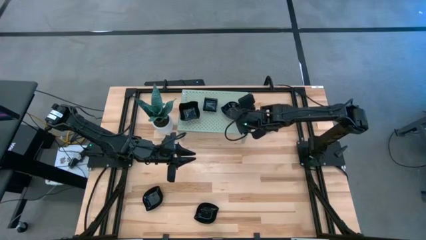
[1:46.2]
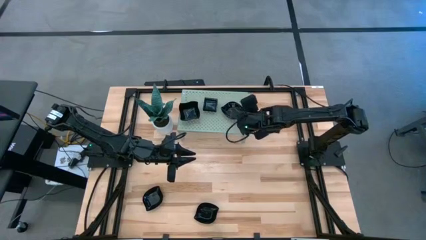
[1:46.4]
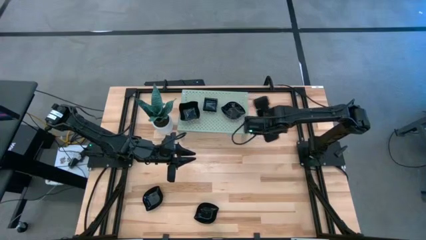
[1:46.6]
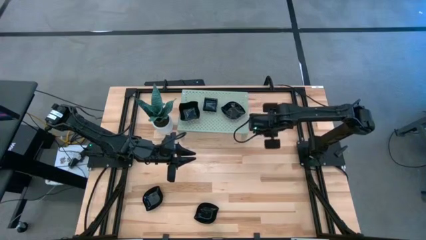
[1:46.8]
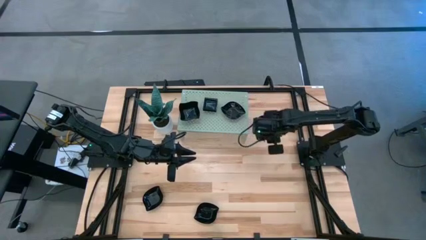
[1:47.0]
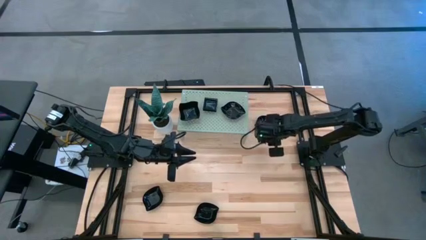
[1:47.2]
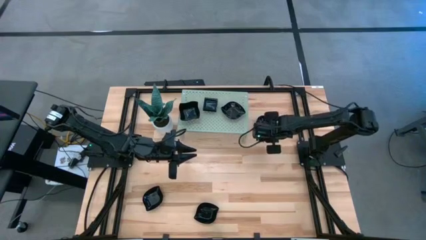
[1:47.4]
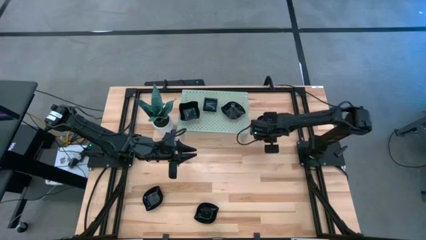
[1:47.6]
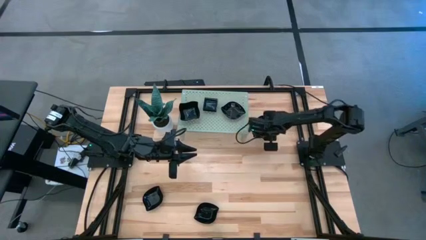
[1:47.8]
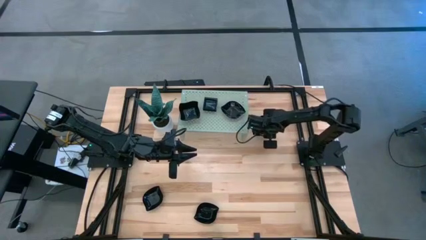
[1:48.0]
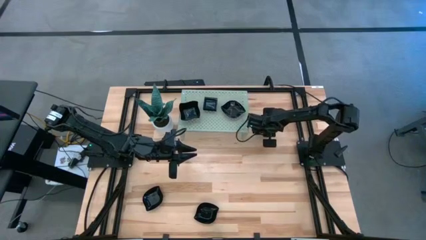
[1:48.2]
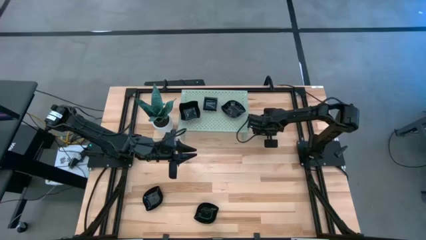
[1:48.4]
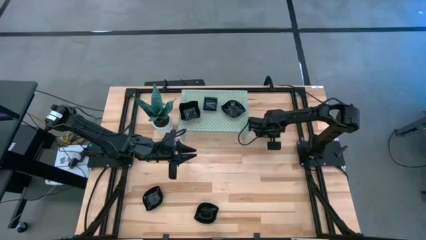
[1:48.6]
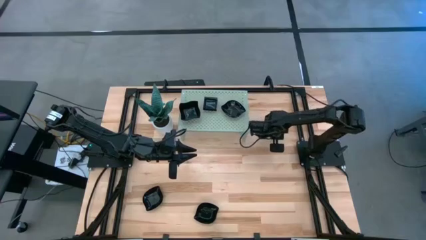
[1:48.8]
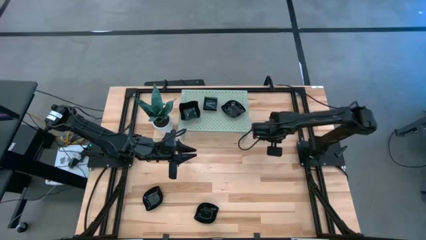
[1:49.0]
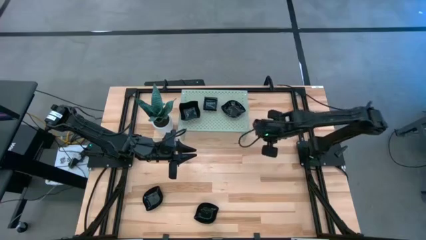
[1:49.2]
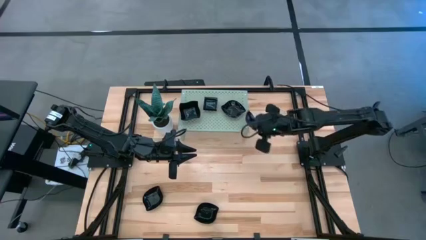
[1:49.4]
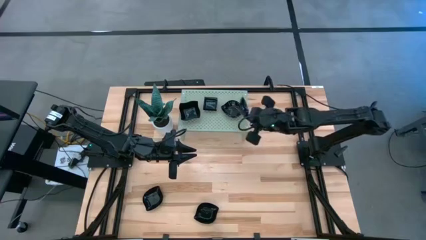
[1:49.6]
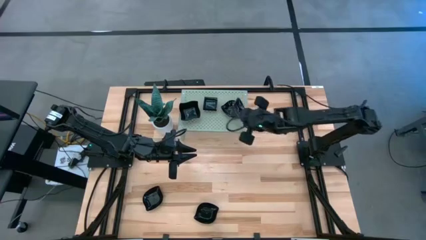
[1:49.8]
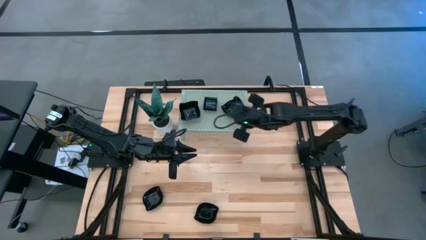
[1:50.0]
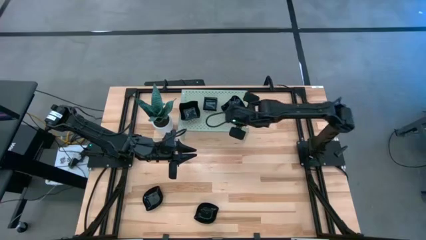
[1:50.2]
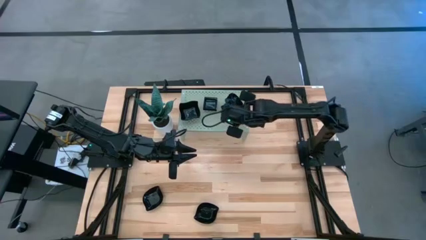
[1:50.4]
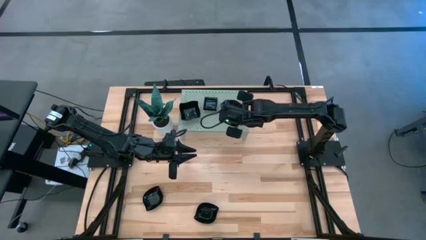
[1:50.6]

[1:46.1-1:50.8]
Task: Pick & Place Mini shaped plates
Stack the leaf-shaped plate on top of the other leaf-shaped plate on the shelf

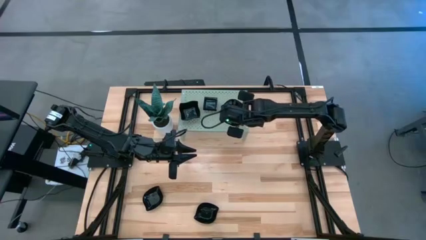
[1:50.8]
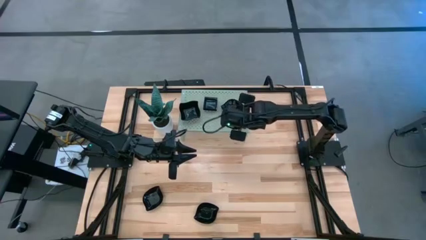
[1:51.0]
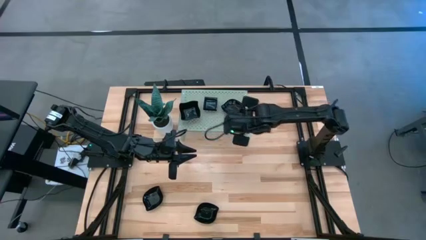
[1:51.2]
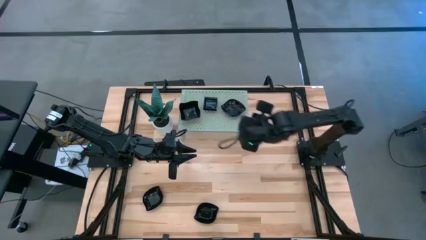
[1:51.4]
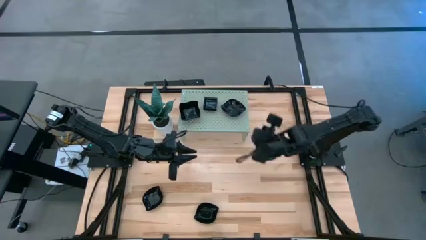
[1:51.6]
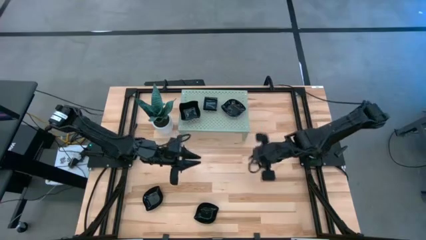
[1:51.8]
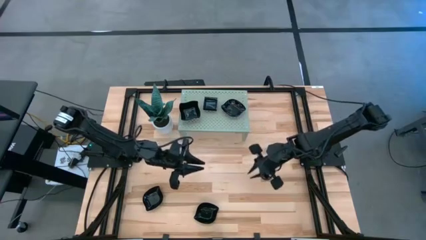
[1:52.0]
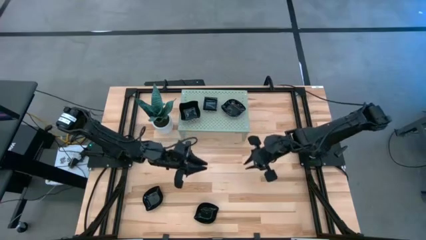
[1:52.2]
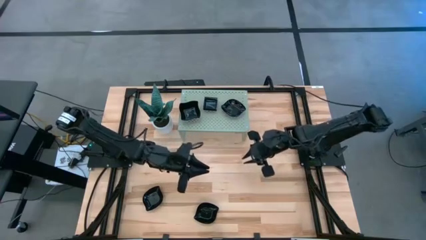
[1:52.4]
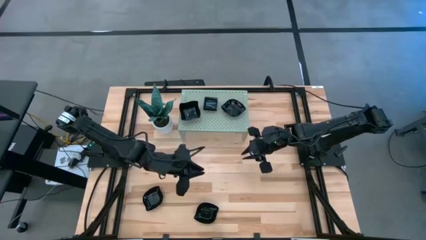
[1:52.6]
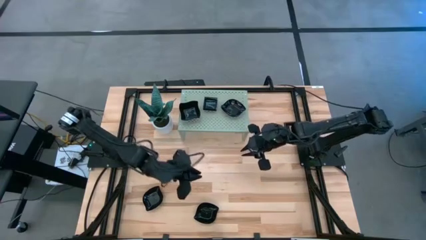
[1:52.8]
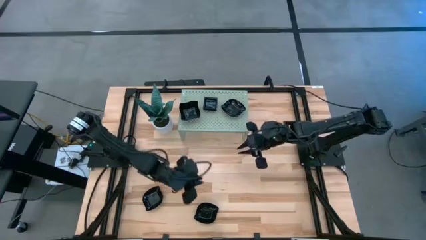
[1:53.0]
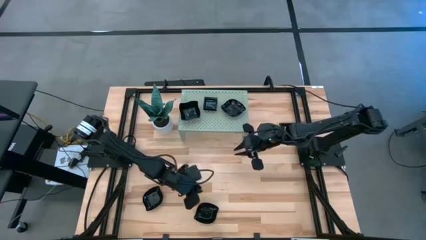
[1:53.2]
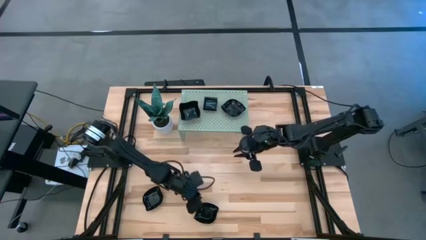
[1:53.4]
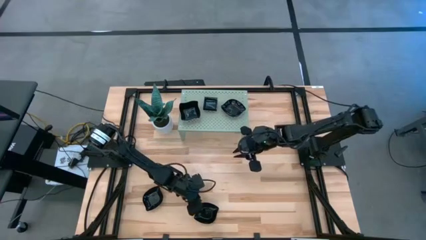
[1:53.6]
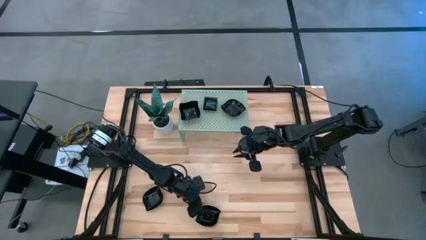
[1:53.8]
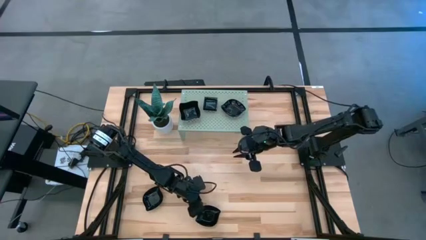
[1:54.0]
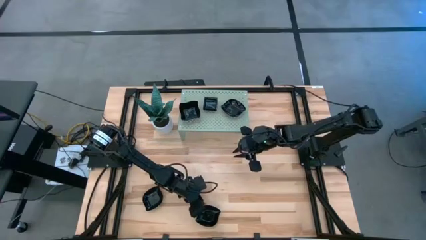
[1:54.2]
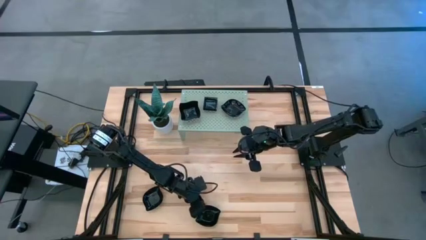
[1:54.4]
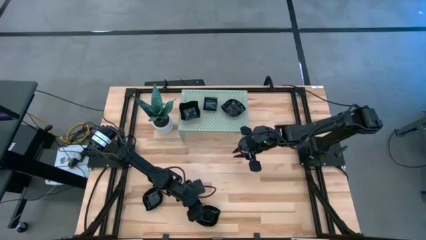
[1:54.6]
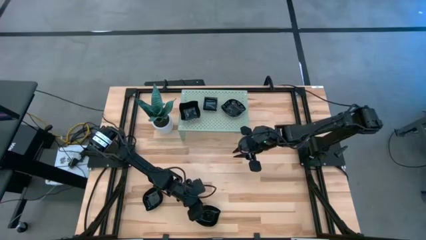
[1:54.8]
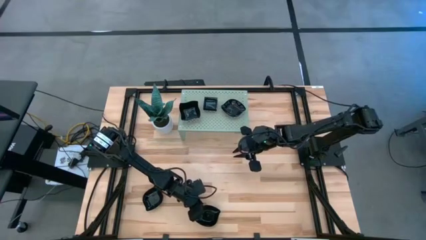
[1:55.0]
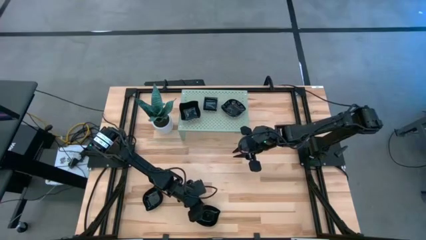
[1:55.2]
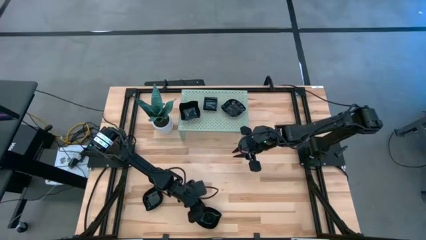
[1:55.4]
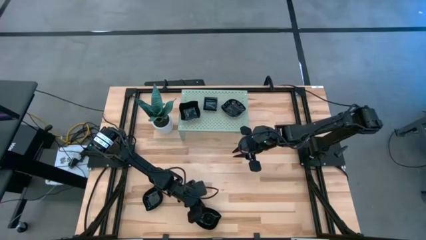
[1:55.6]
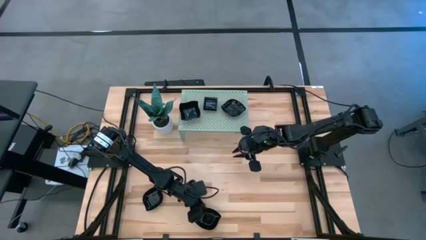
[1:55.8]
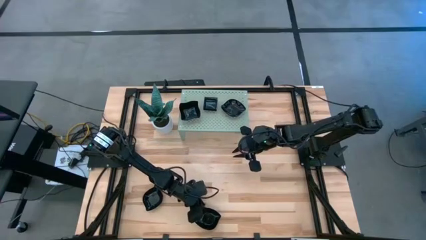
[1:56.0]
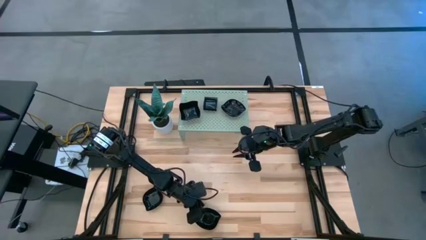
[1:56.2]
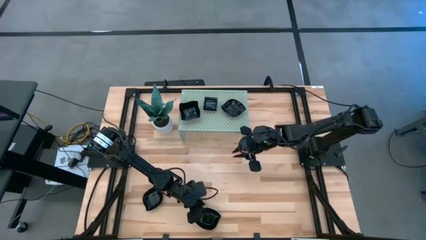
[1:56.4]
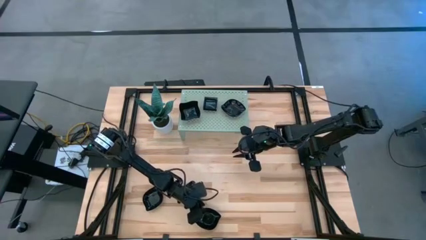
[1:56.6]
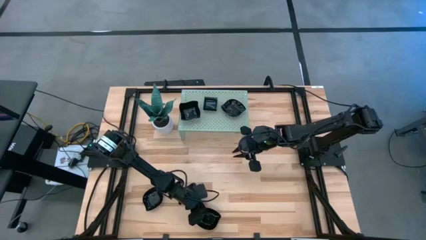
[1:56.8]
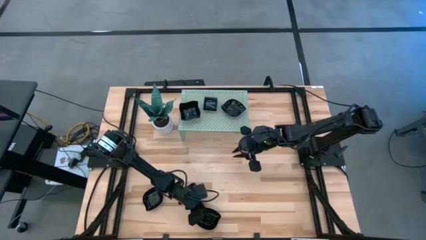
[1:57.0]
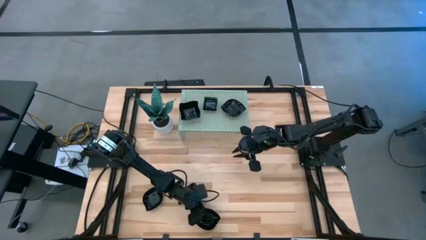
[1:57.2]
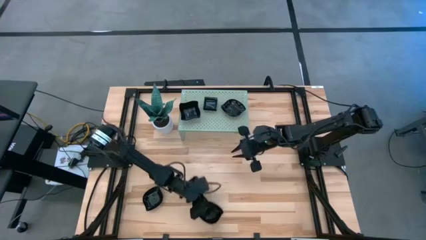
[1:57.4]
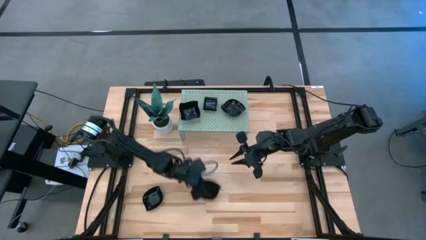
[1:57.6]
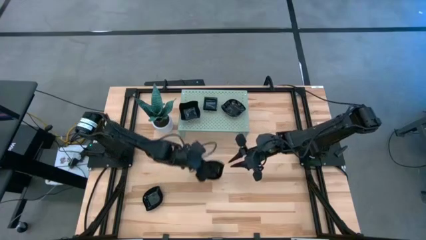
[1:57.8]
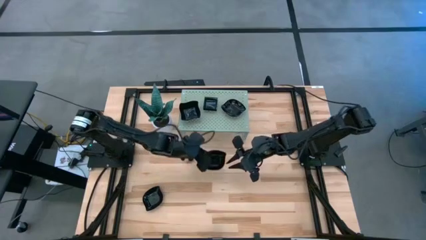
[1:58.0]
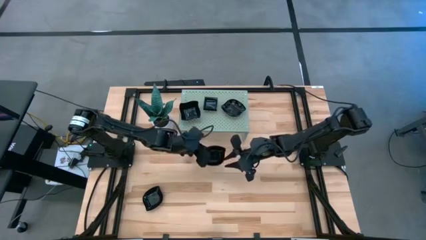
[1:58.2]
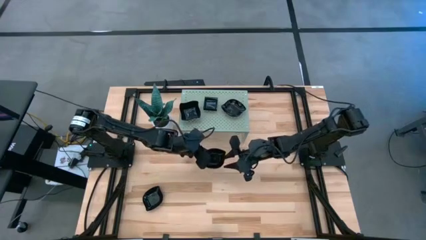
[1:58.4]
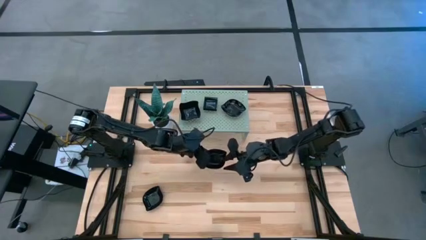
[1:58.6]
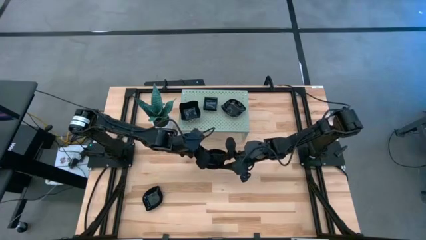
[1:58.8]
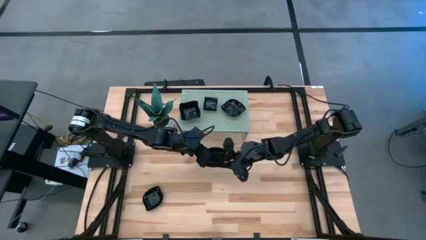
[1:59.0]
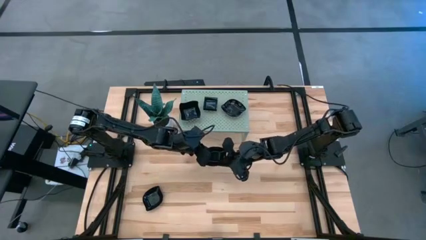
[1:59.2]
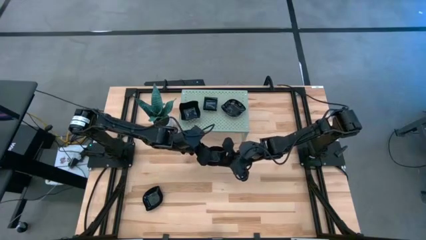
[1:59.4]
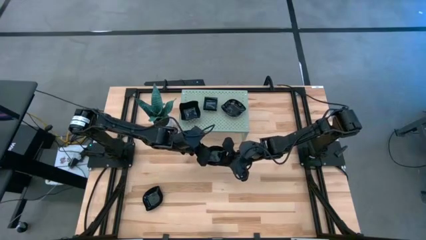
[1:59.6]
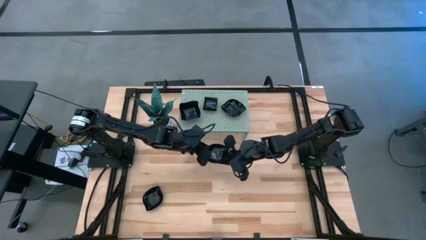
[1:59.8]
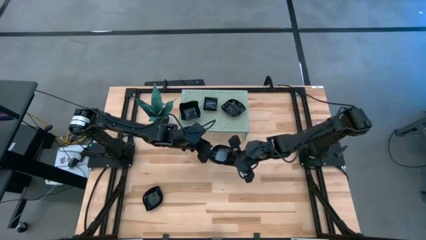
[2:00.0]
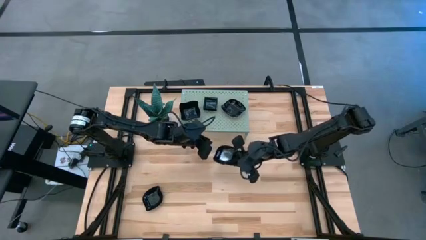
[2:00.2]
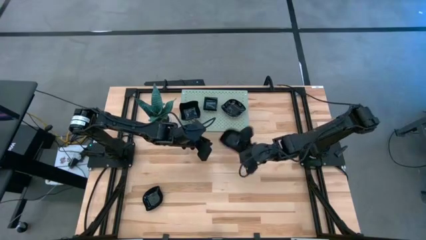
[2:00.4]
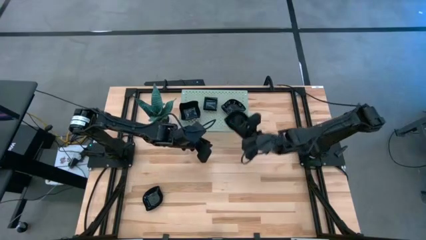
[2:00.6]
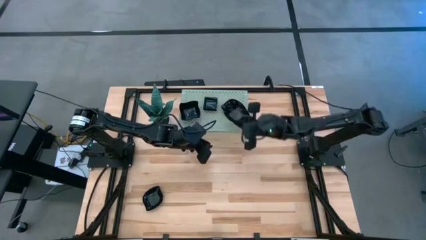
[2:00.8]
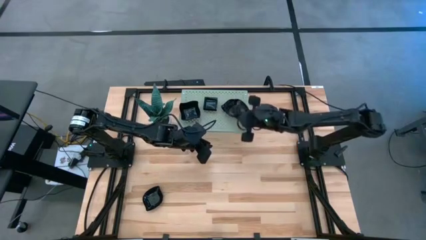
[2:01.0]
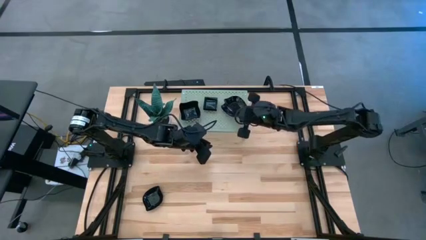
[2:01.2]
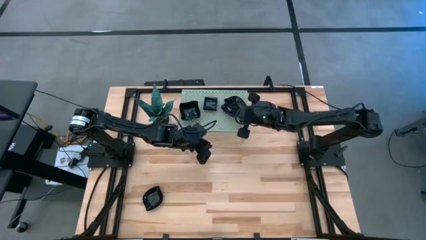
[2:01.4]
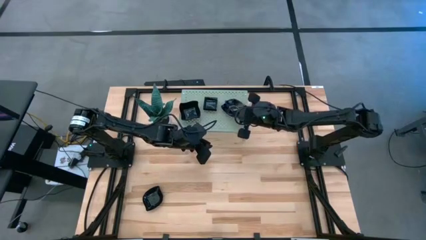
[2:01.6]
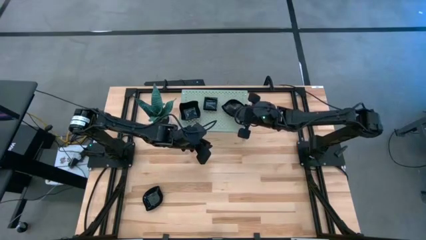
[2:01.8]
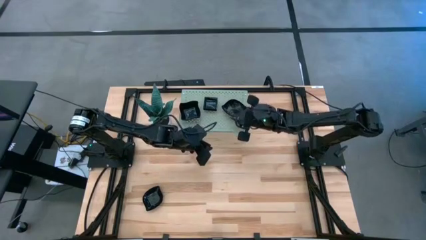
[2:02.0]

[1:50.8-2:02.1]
Stack the leaf-shaped plate on top of the other leaf-shaped plate on the shelf

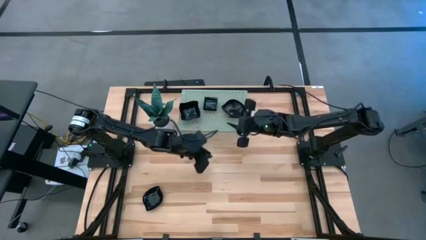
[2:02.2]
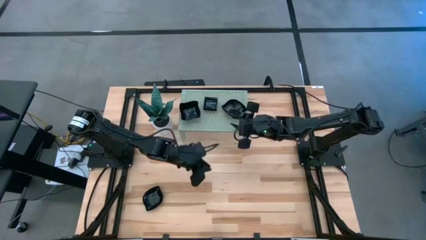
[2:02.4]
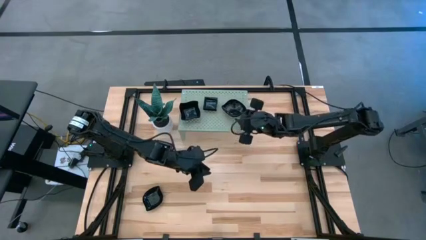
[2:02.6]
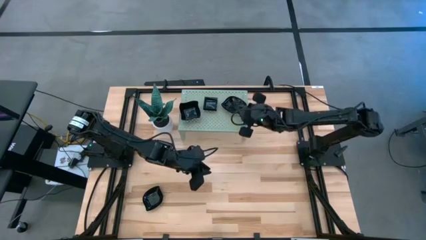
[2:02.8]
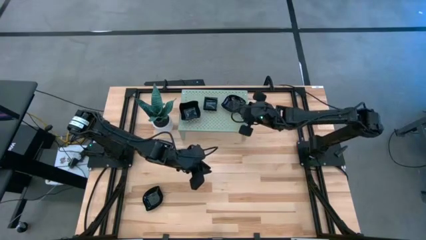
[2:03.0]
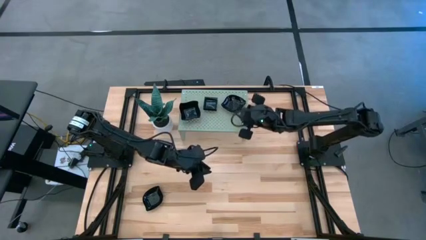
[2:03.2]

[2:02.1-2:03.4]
Adjust the leaf-shaped plate on the shelf
